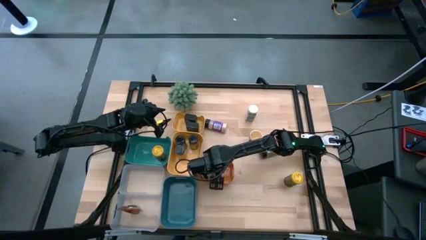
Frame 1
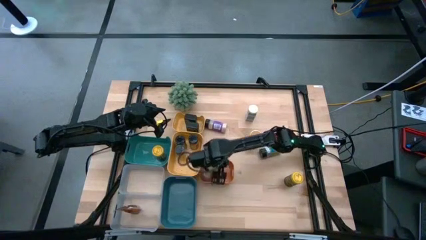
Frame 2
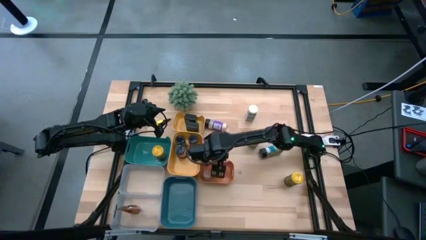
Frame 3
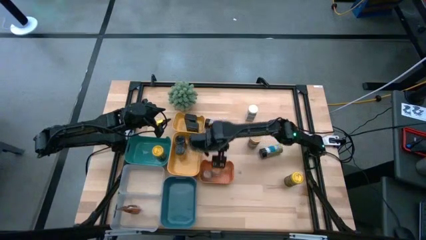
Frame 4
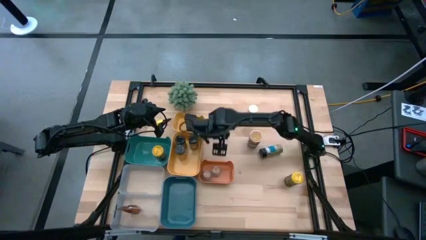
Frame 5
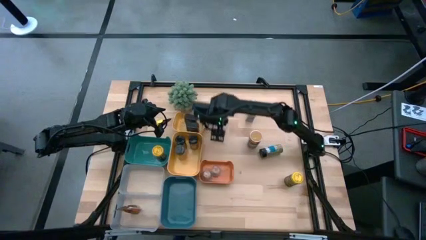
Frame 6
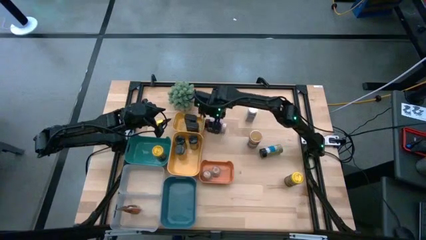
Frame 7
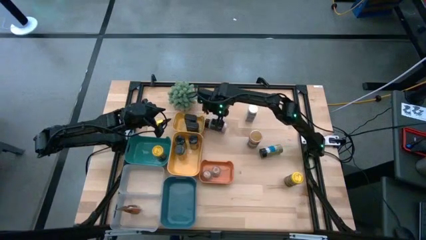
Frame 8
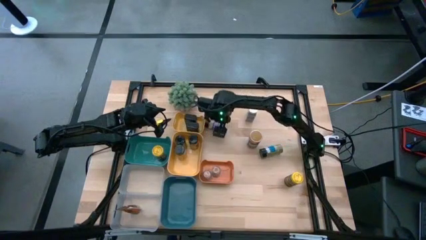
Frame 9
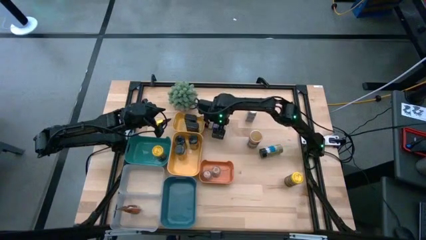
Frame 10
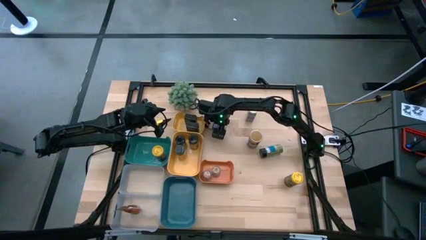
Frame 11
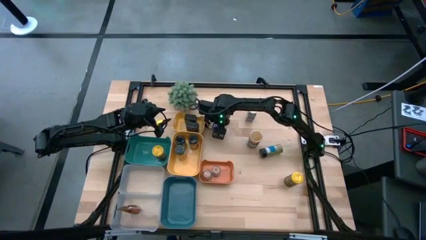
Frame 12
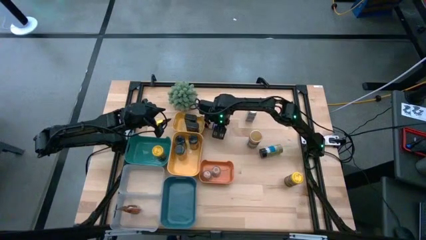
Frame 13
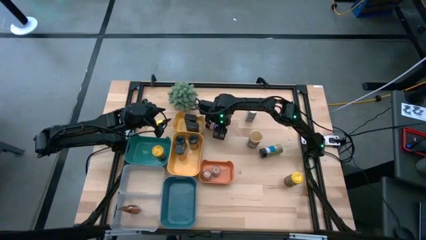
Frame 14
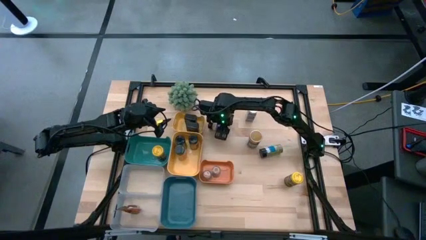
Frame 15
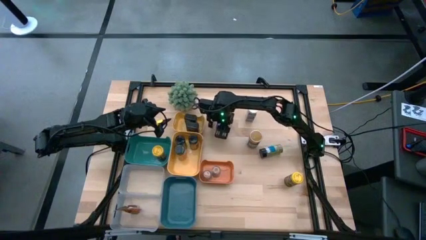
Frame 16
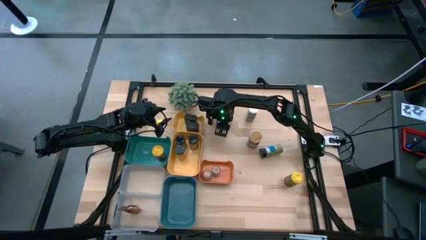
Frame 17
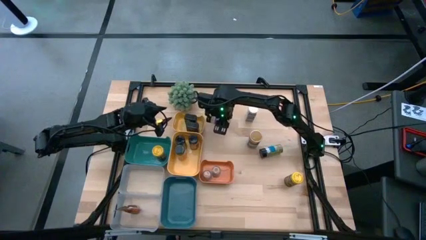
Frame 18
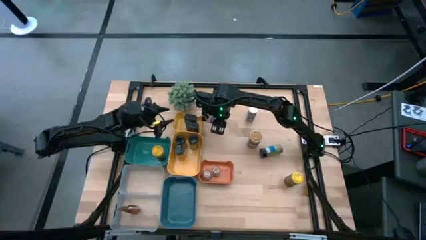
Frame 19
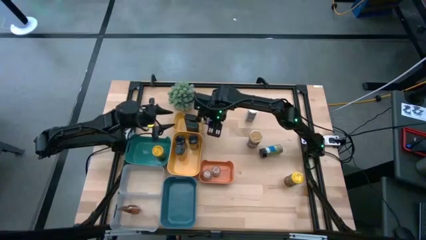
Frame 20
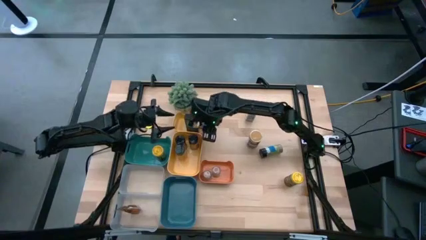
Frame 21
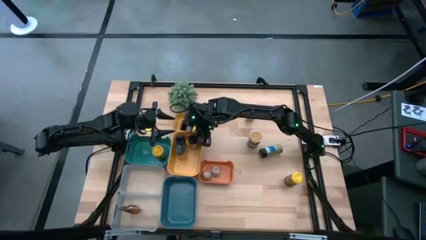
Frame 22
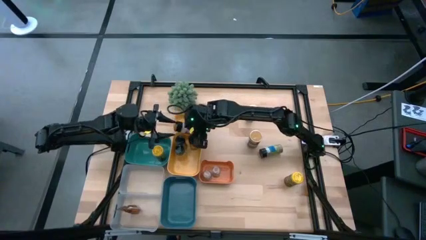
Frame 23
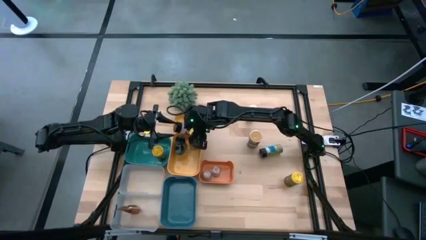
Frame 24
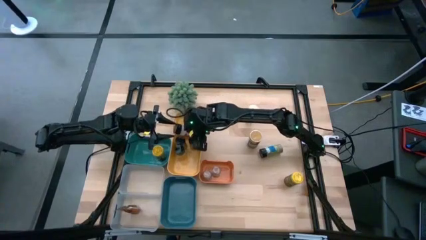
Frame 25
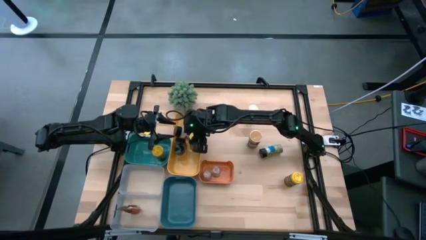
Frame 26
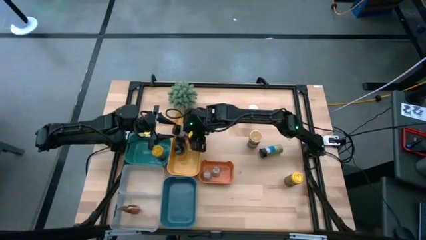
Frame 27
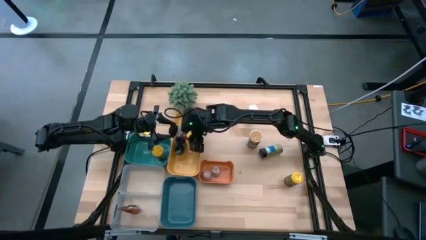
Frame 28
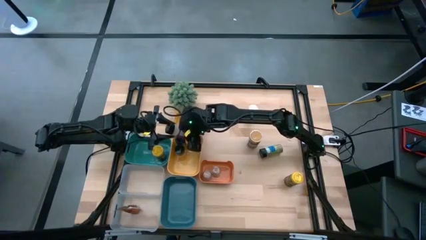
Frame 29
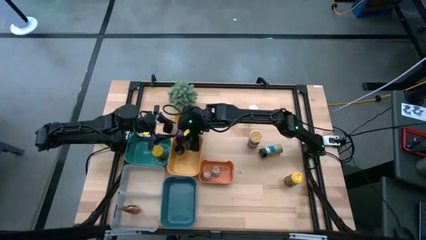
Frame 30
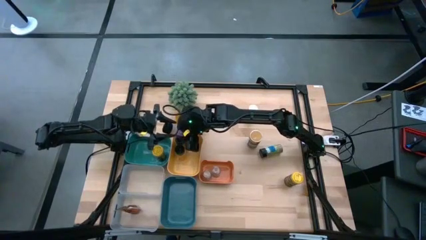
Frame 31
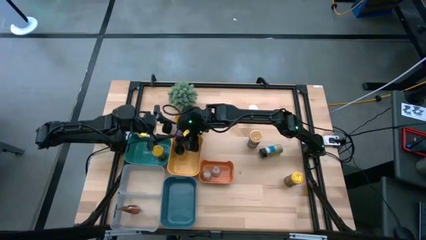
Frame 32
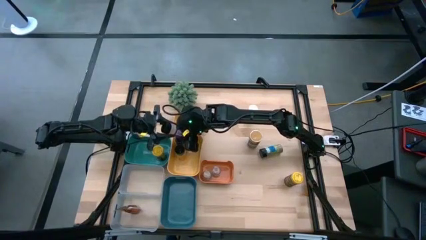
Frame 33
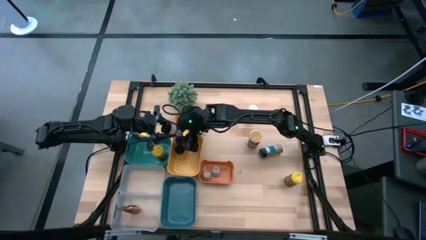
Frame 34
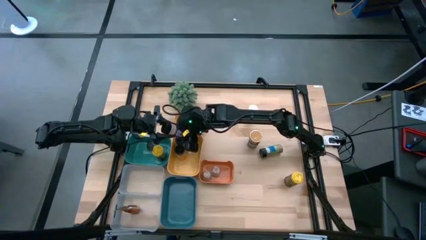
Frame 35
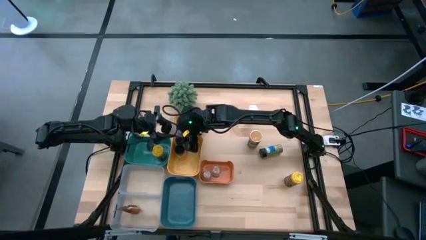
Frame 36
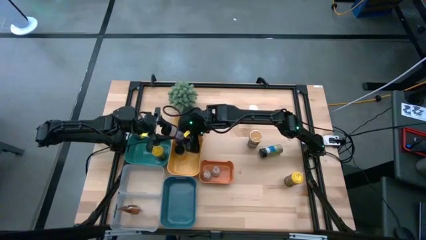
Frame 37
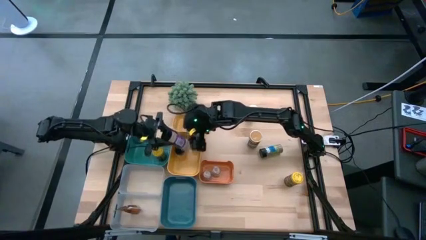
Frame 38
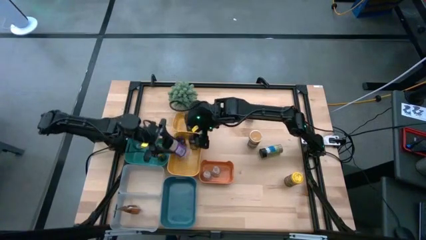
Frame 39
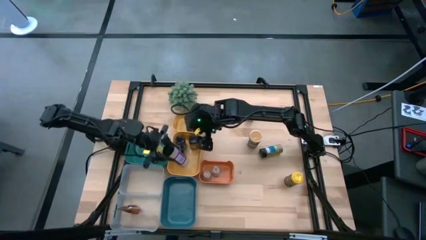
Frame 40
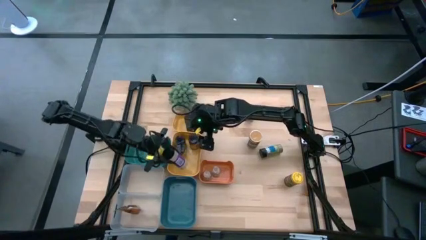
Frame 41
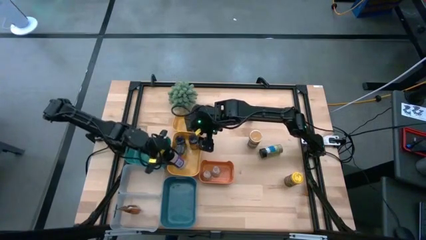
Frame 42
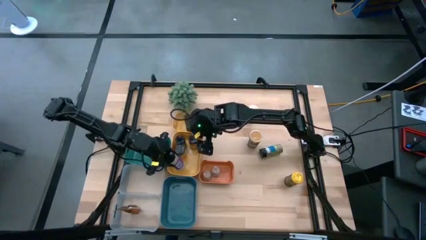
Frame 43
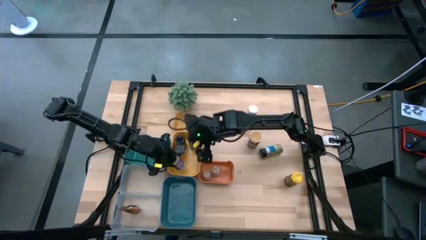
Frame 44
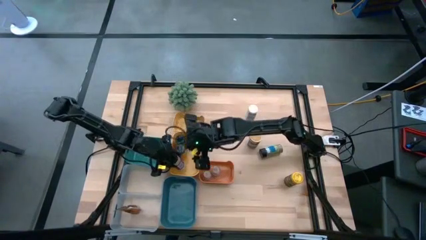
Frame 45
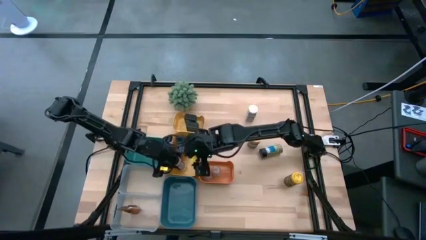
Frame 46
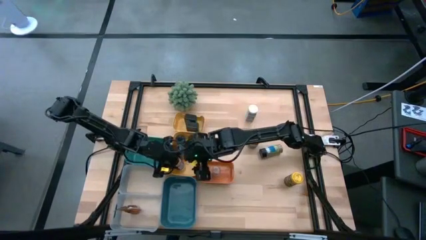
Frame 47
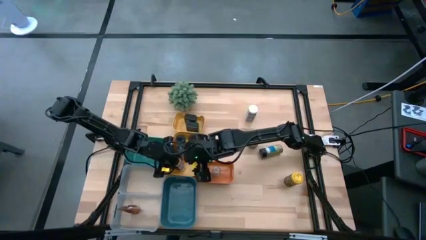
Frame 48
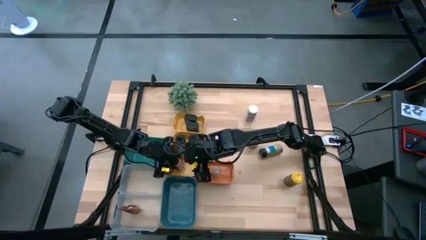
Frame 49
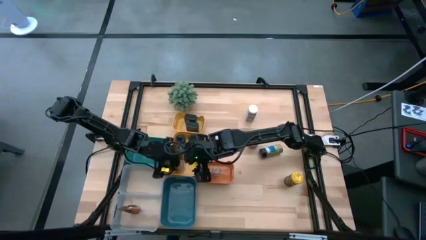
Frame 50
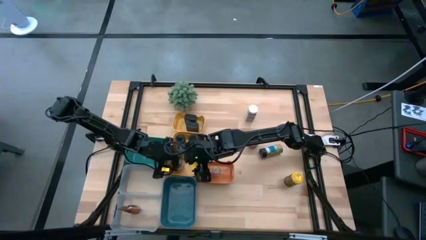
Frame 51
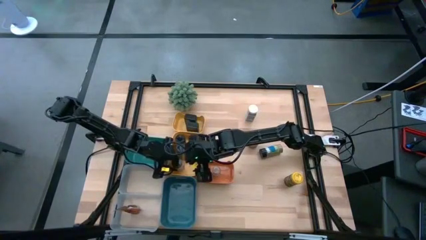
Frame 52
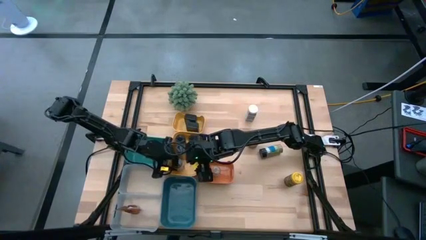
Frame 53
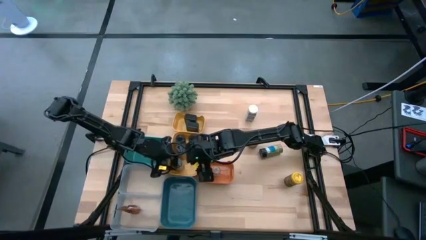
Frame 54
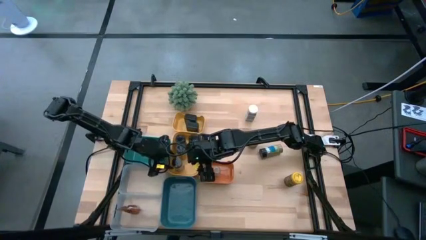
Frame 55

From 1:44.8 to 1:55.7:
Task: Sort spices by type
Put the black seasoning bottle into the bottom yellow bin
